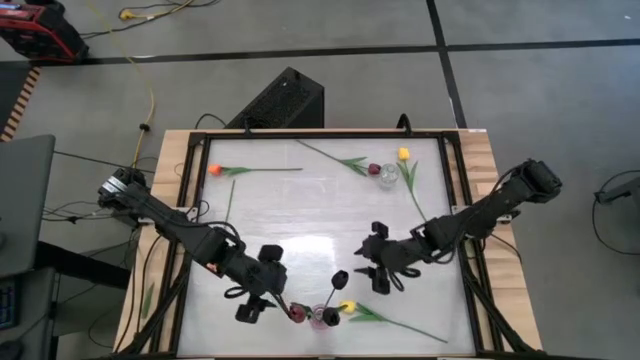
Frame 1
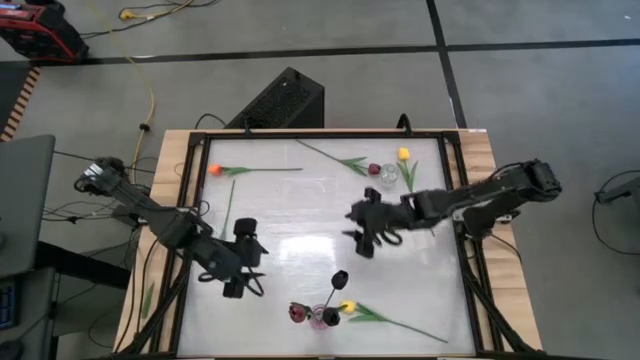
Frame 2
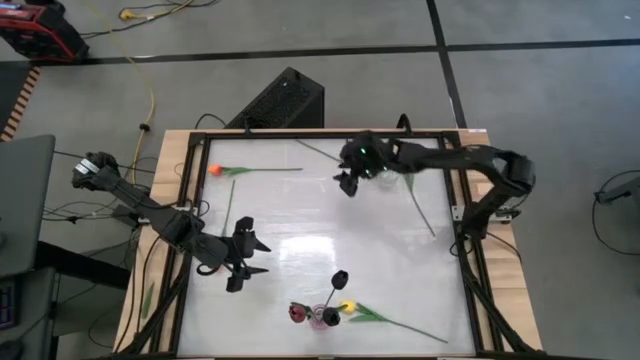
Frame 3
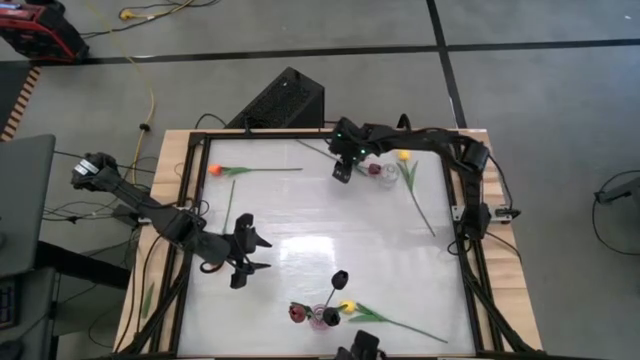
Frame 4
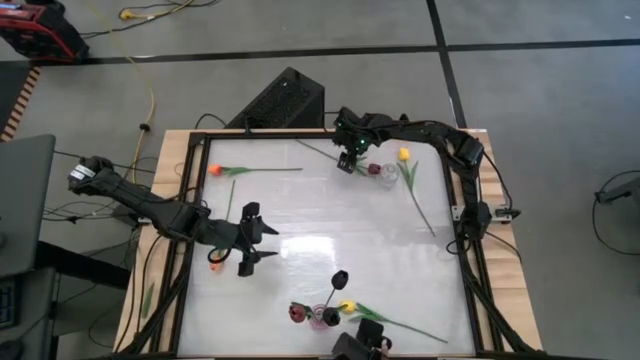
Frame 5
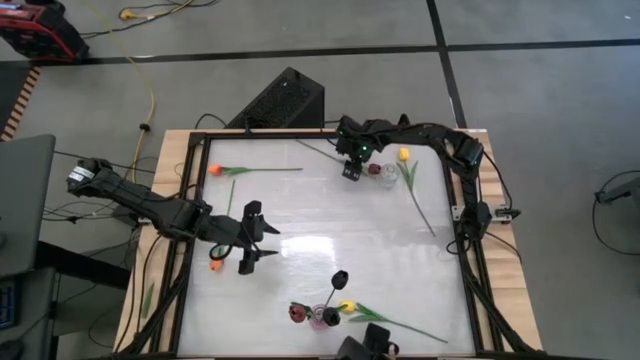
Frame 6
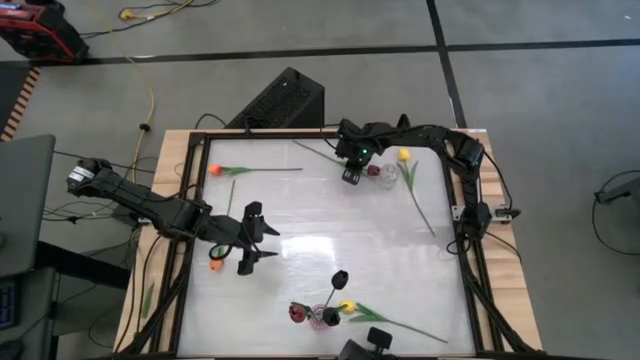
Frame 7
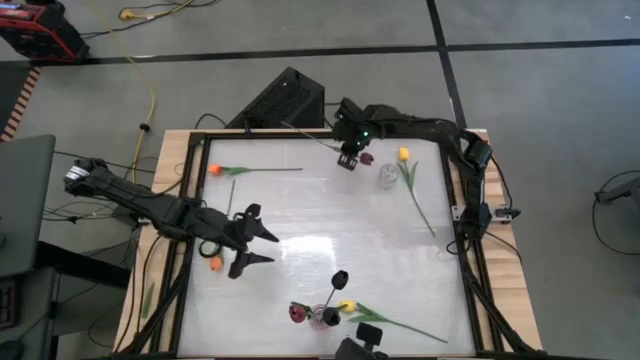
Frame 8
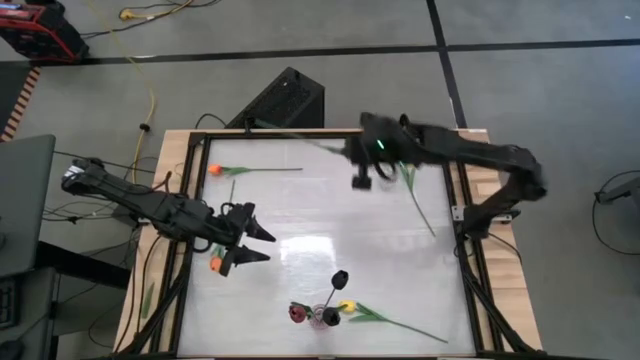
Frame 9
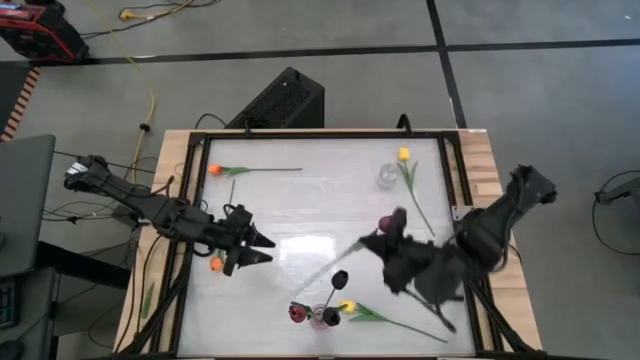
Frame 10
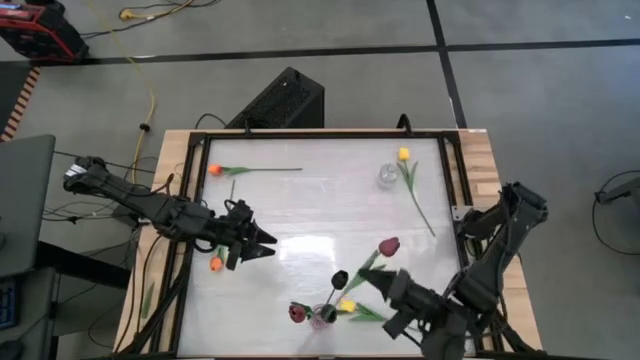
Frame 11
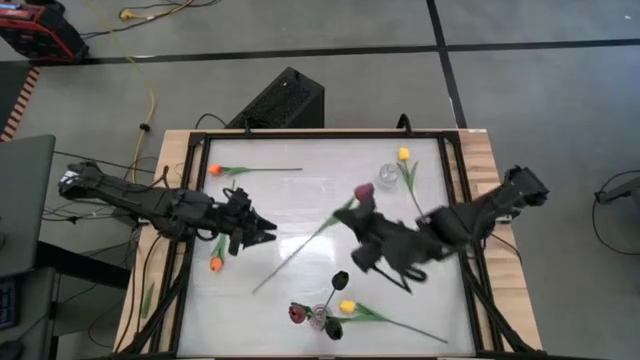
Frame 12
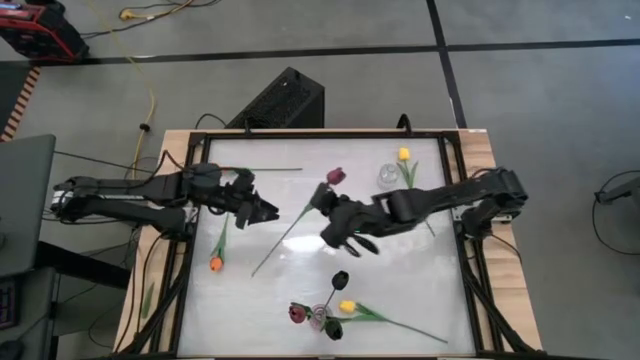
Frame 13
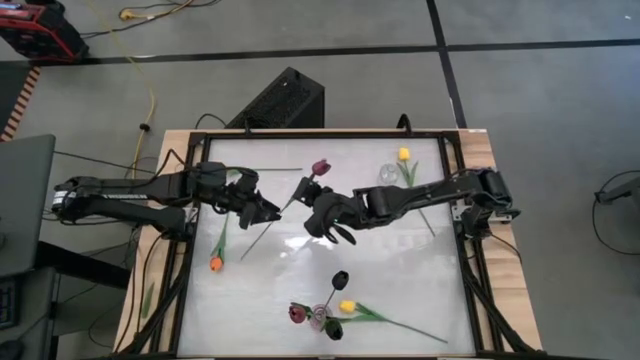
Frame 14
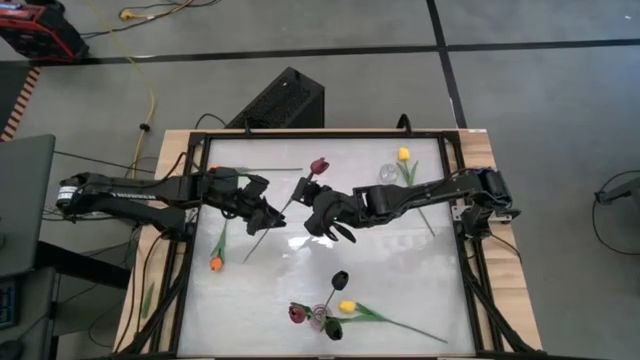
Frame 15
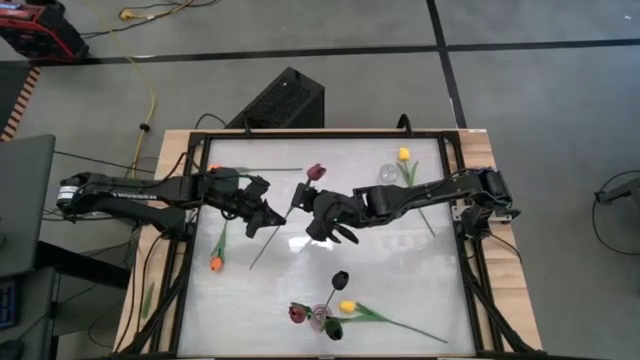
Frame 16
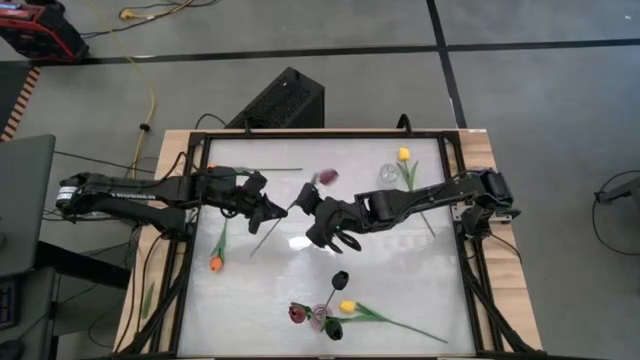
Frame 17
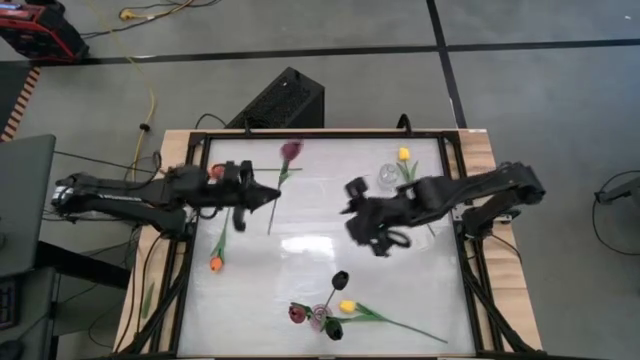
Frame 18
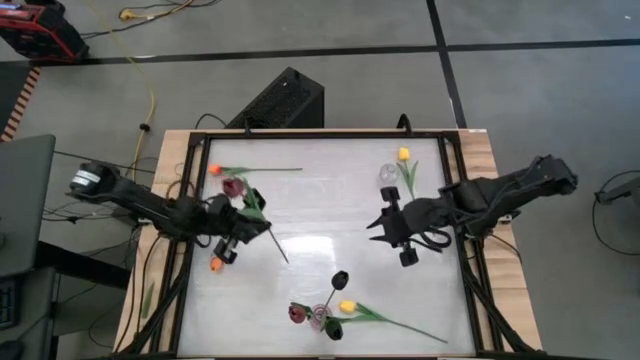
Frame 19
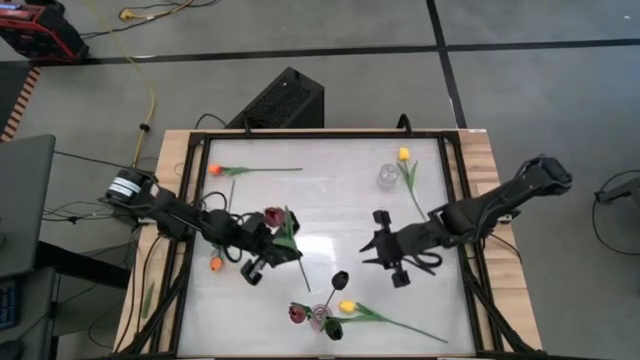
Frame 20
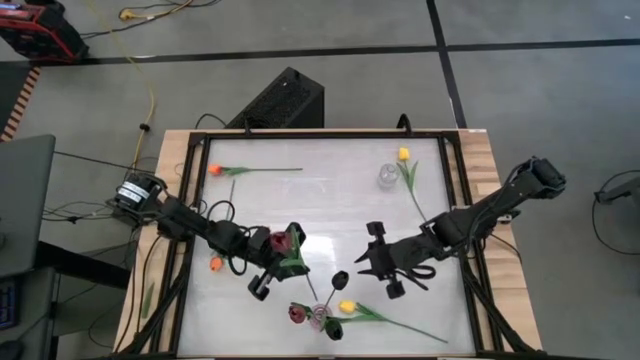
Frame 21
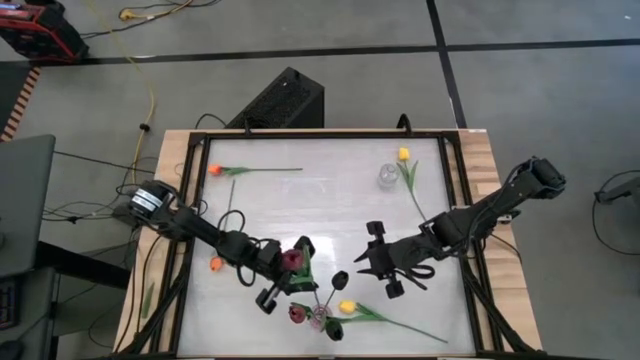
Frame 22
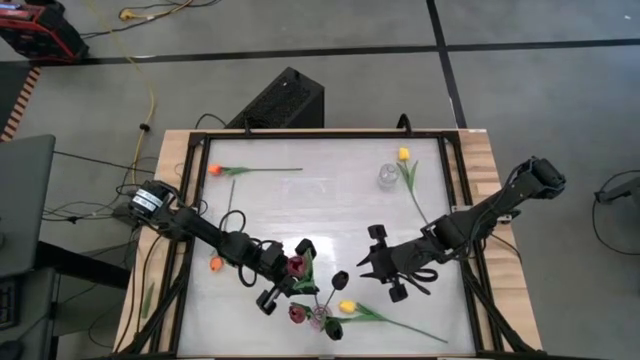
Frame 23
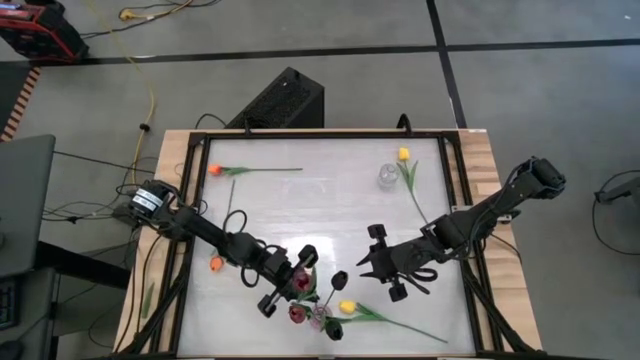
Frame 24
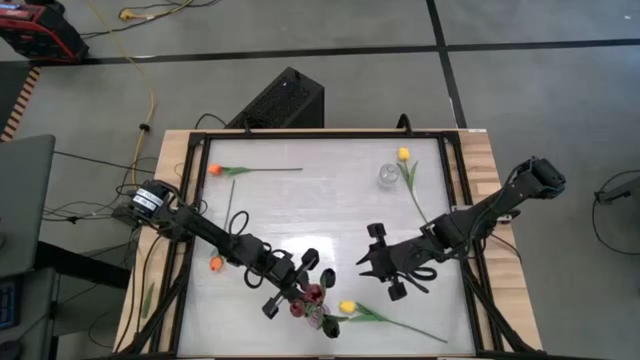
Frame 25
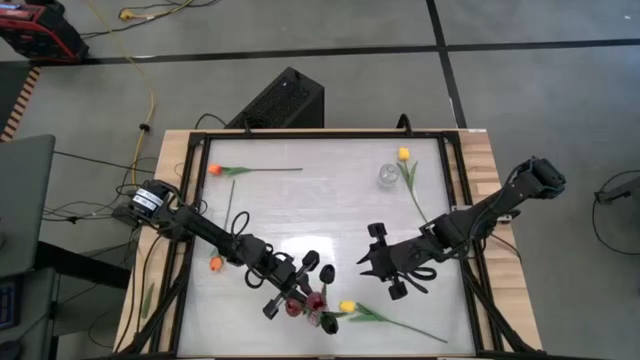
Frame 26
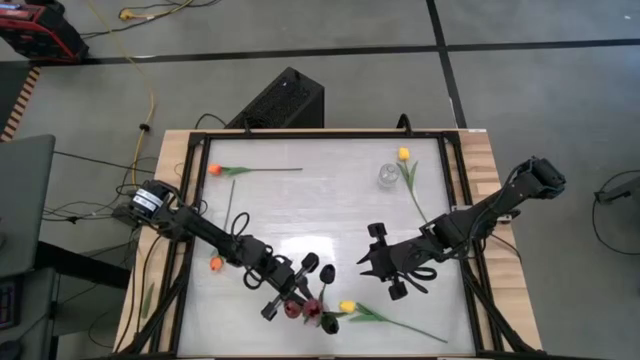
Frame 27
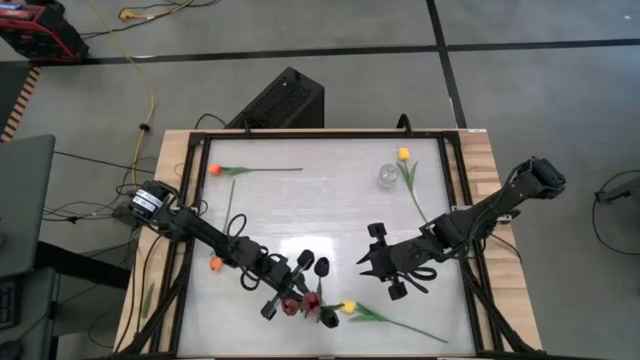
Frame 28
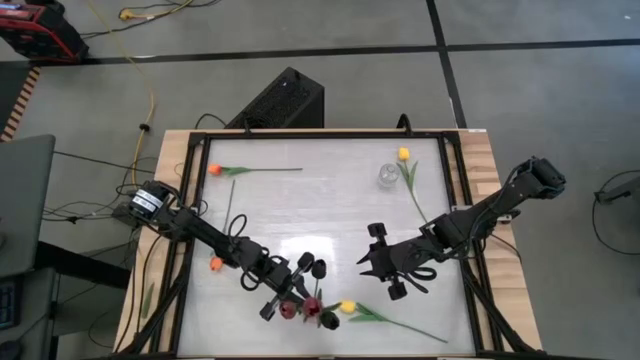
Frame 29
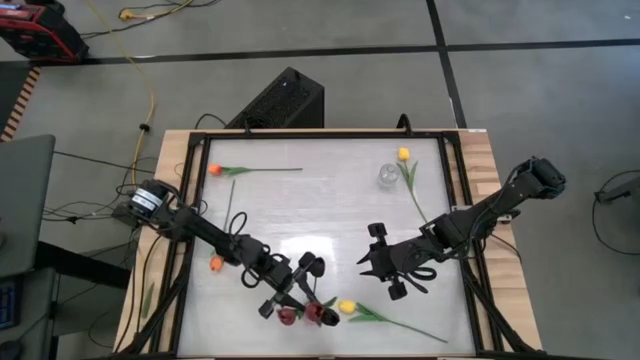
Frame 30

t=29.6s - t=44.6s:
Task: Sort flowers into vase by color
Put the dark red tulip into the pink vase

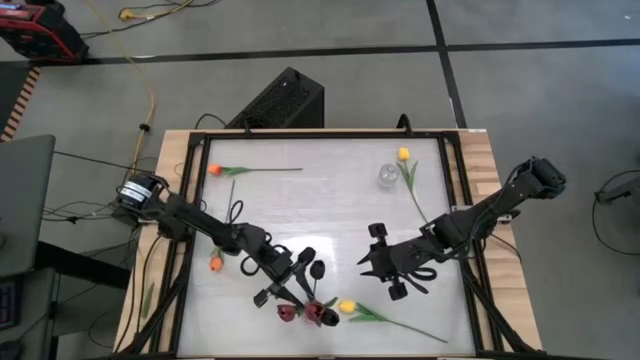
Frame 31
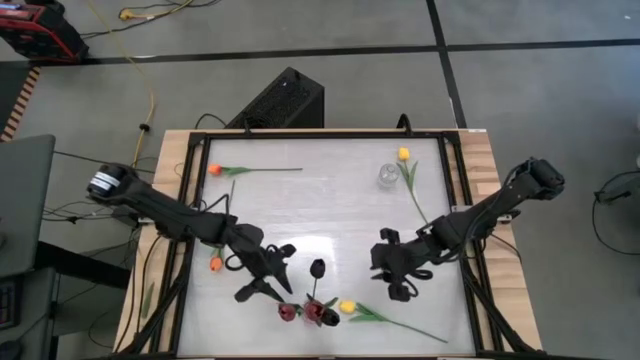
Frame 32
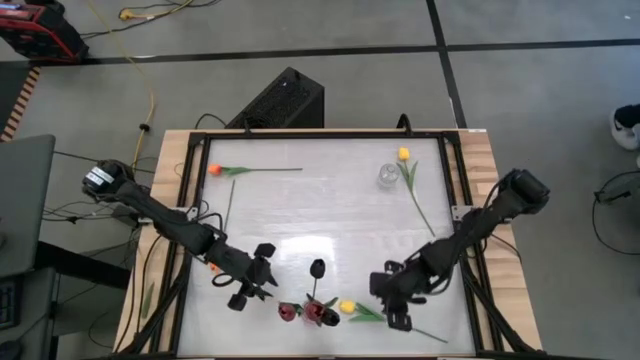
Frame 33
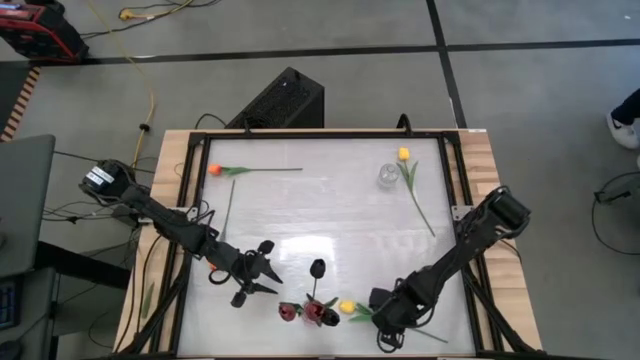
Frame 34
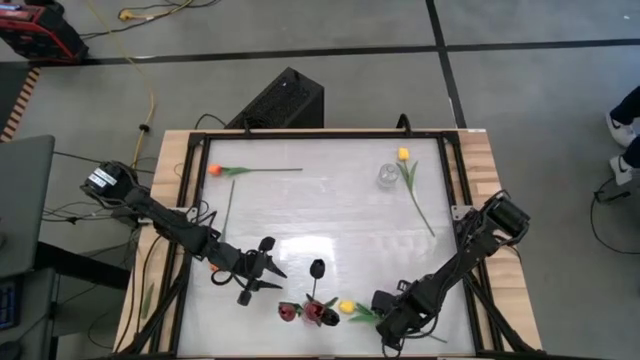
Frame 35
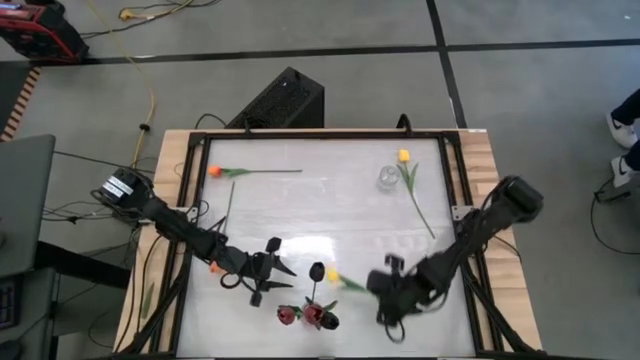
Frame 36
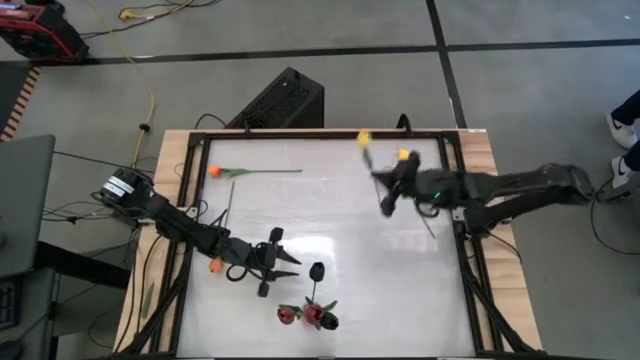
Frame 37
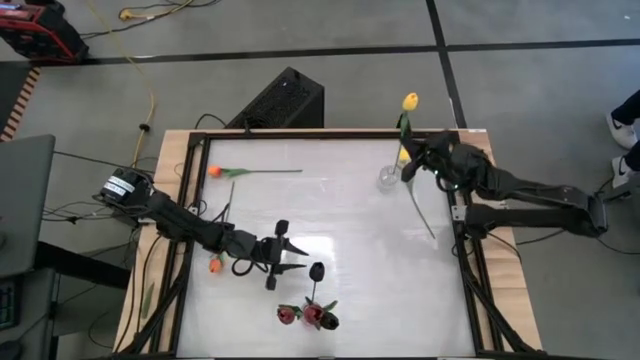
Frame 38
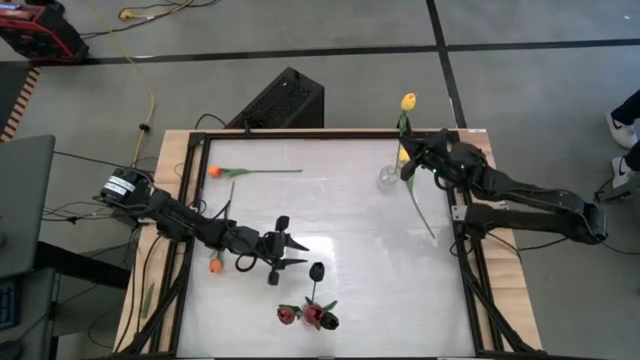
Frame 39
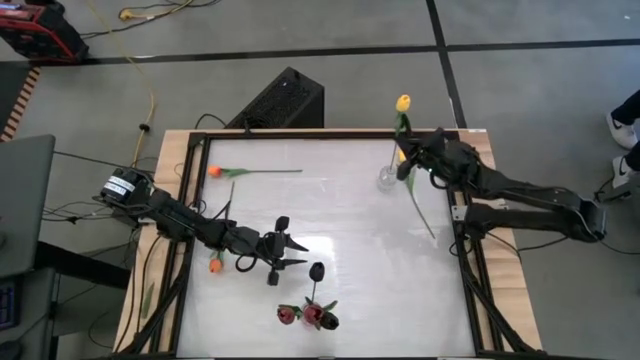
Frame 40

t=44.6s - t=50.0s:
Put the bottom yellow tulip into the transparent vase
